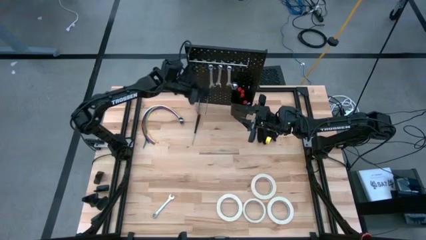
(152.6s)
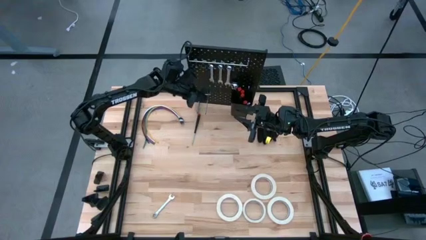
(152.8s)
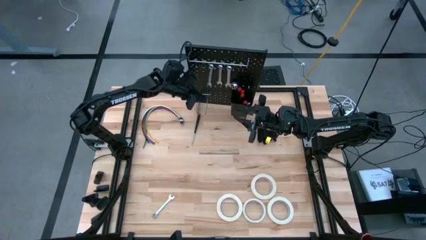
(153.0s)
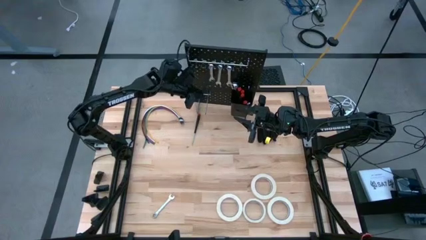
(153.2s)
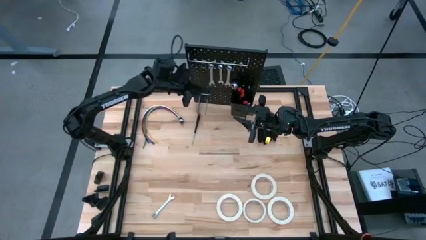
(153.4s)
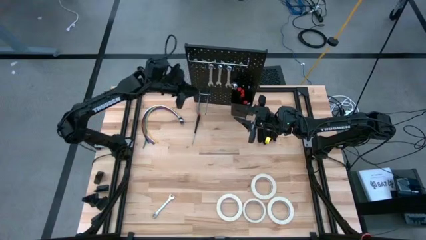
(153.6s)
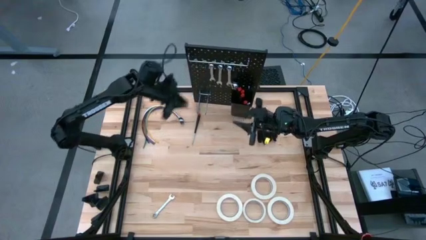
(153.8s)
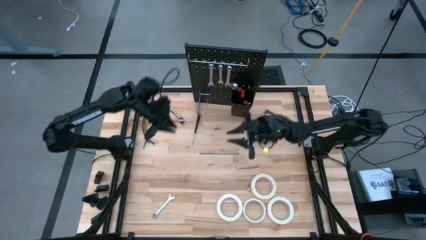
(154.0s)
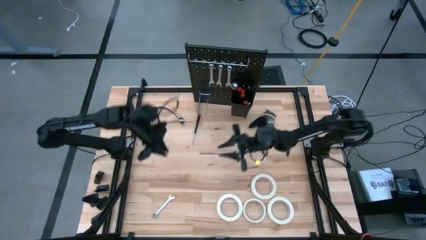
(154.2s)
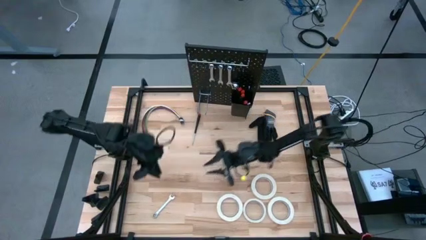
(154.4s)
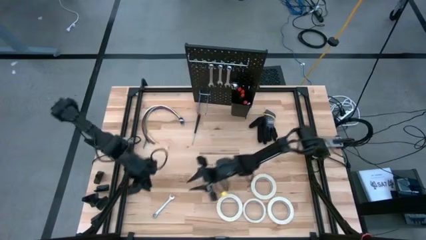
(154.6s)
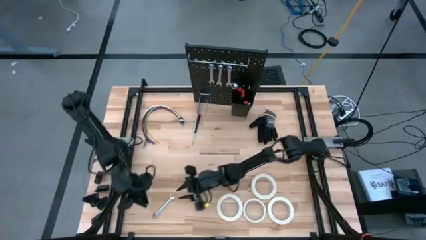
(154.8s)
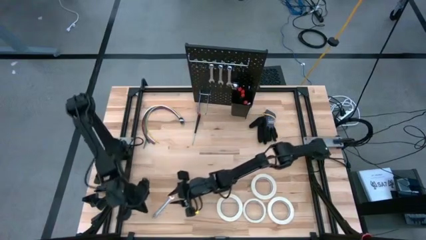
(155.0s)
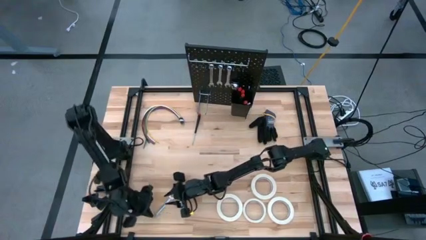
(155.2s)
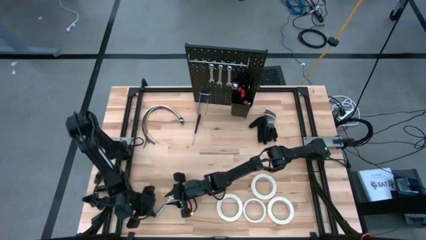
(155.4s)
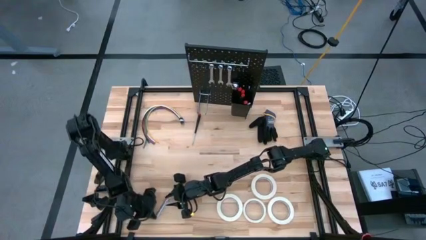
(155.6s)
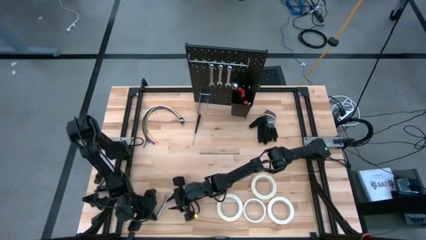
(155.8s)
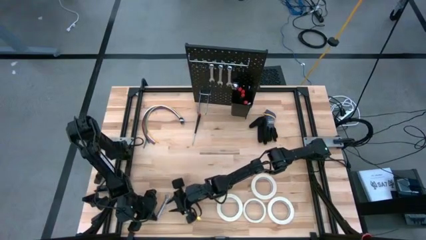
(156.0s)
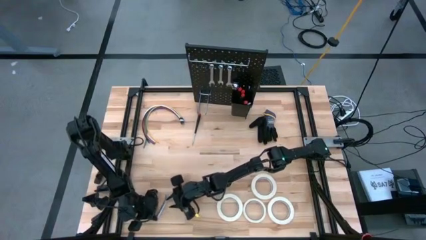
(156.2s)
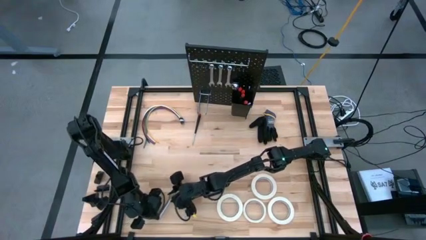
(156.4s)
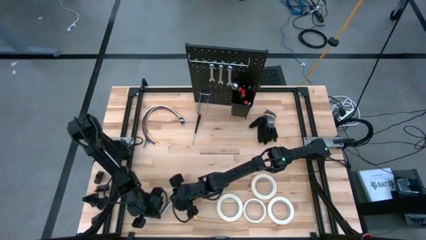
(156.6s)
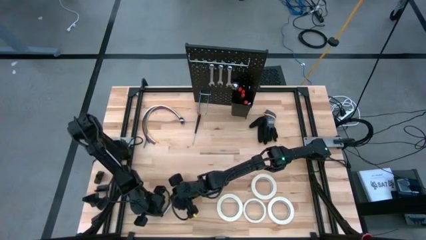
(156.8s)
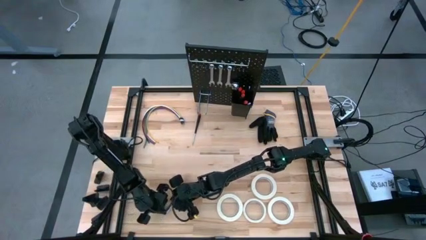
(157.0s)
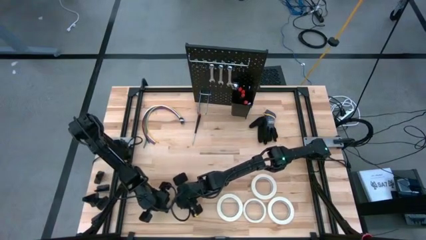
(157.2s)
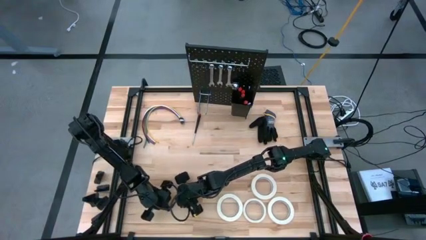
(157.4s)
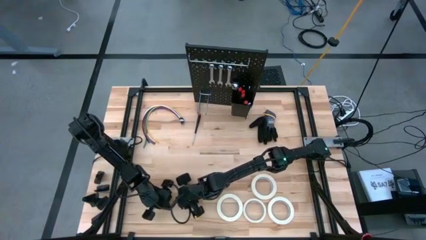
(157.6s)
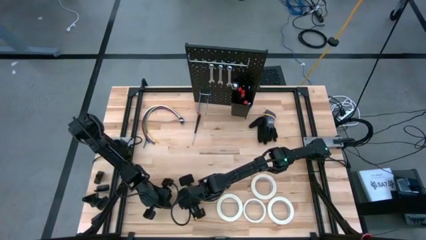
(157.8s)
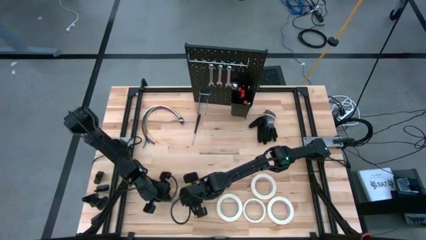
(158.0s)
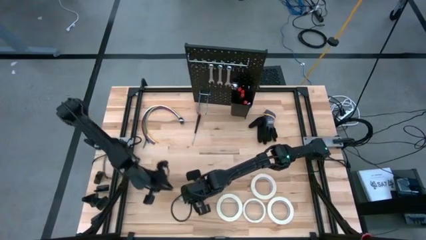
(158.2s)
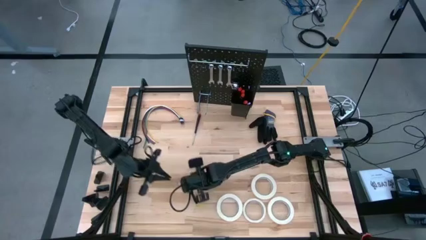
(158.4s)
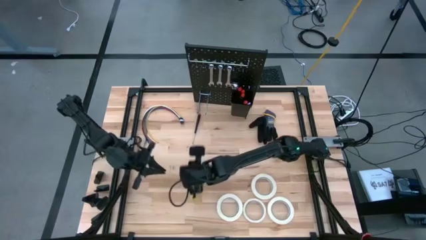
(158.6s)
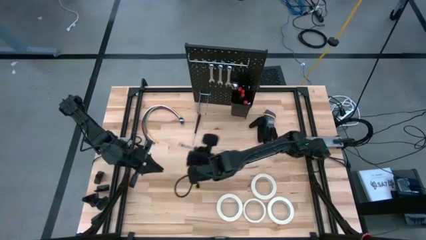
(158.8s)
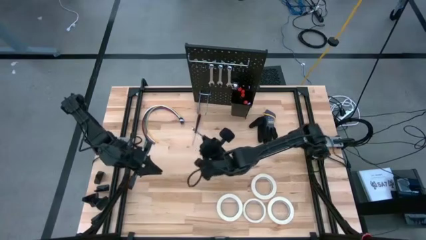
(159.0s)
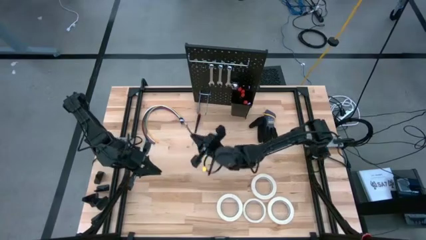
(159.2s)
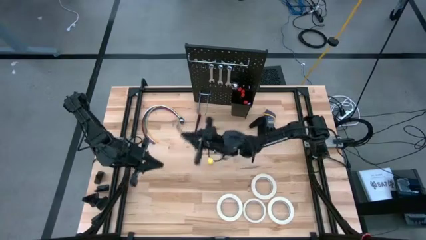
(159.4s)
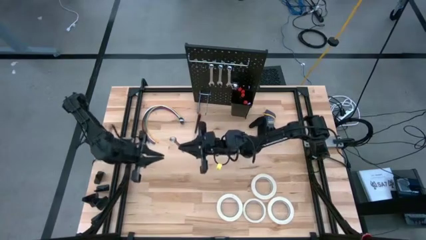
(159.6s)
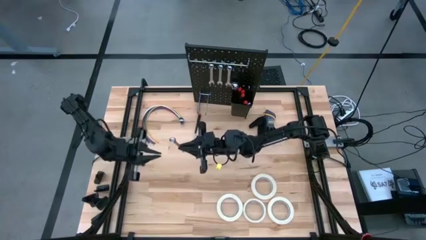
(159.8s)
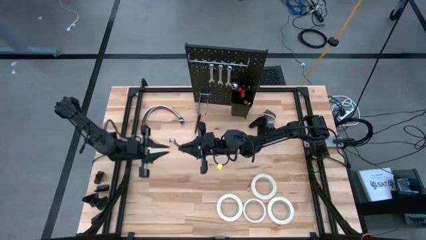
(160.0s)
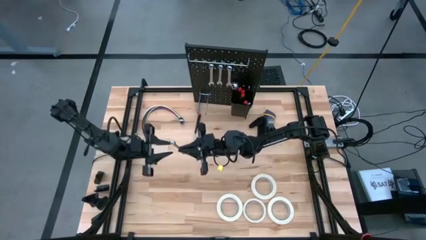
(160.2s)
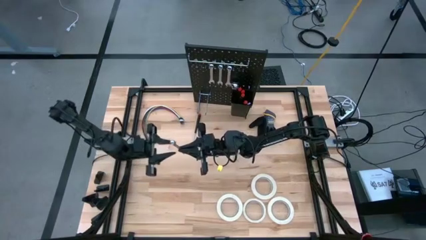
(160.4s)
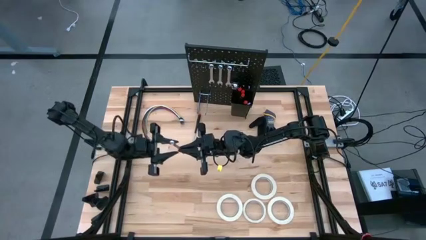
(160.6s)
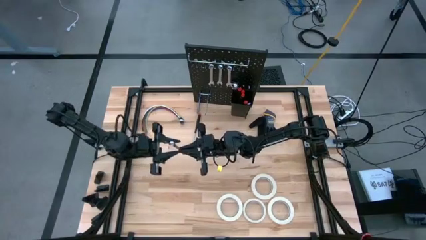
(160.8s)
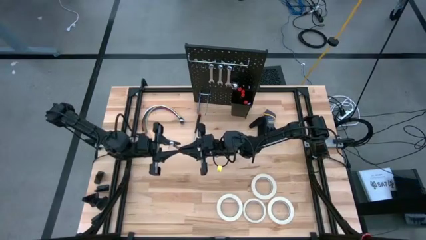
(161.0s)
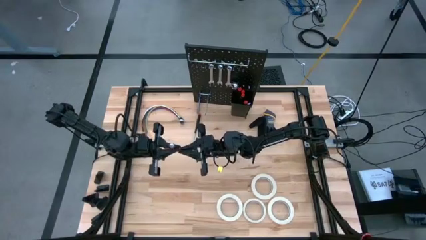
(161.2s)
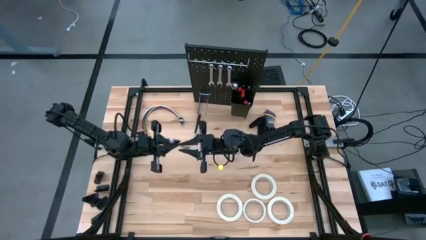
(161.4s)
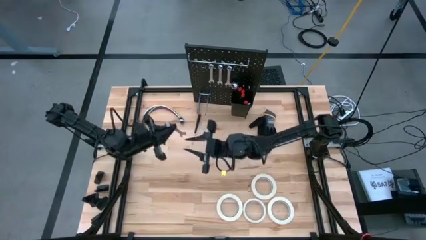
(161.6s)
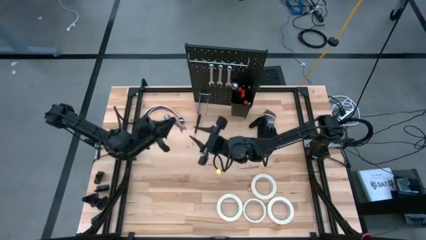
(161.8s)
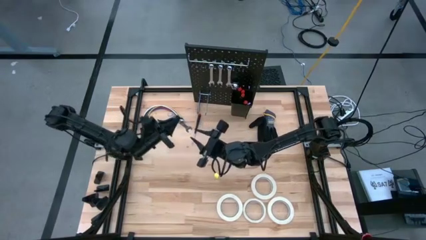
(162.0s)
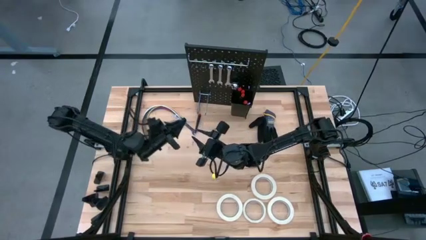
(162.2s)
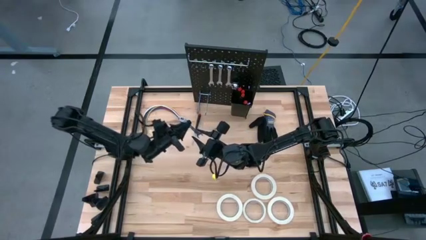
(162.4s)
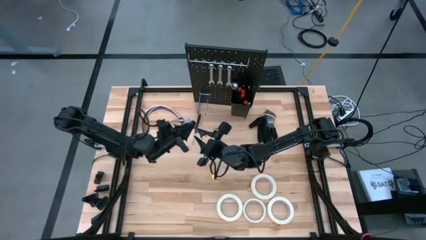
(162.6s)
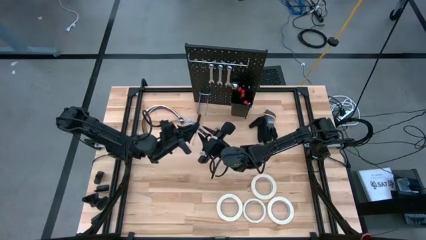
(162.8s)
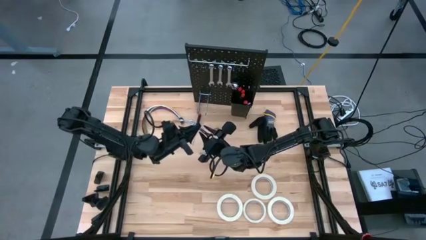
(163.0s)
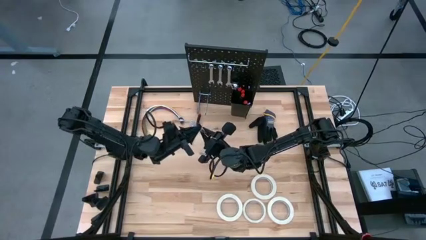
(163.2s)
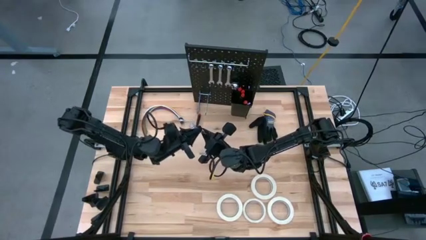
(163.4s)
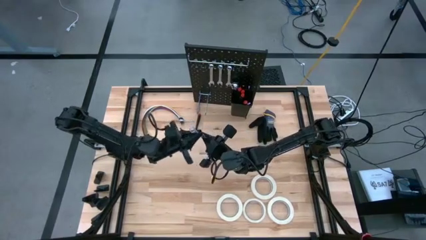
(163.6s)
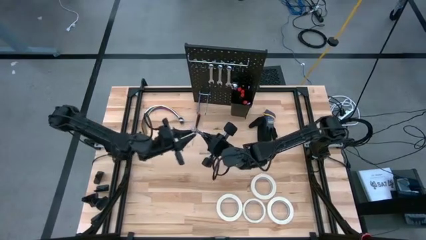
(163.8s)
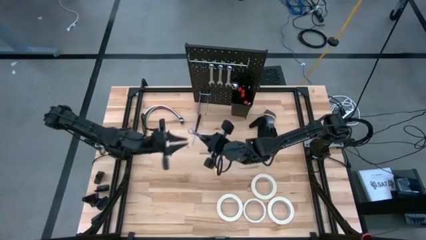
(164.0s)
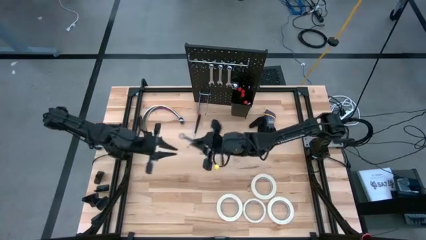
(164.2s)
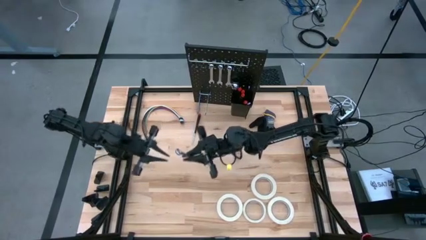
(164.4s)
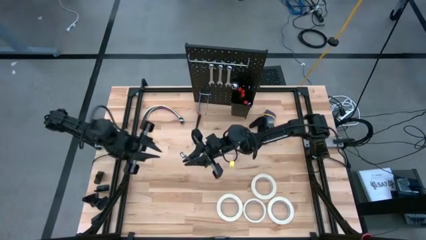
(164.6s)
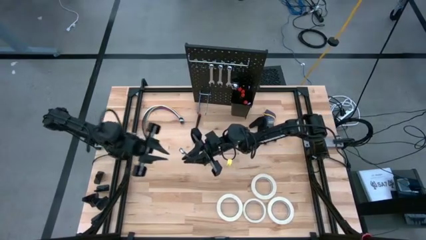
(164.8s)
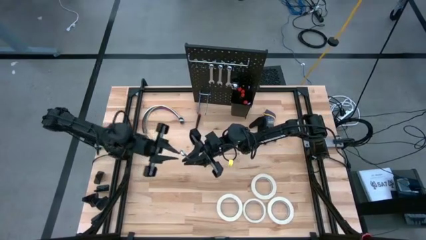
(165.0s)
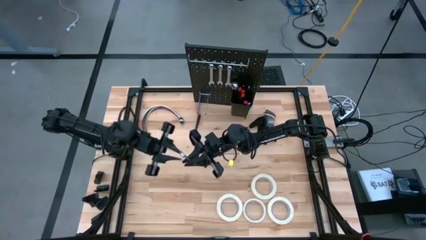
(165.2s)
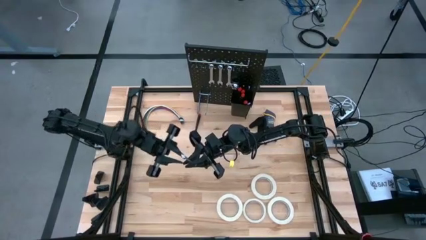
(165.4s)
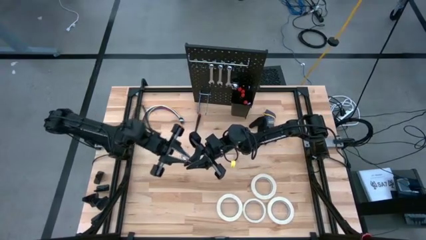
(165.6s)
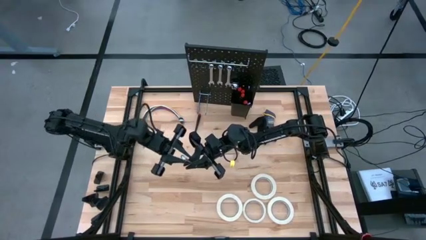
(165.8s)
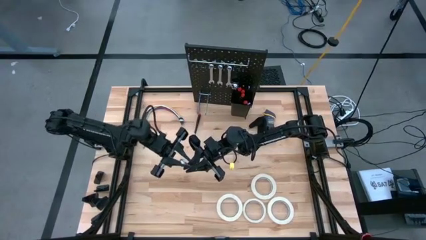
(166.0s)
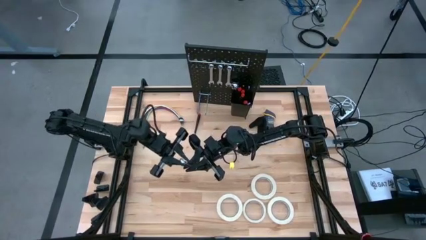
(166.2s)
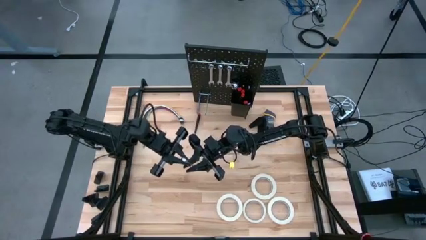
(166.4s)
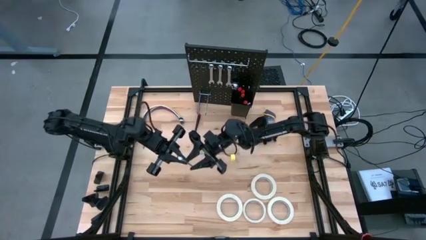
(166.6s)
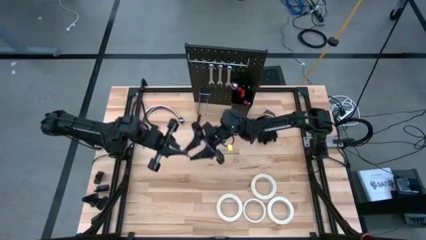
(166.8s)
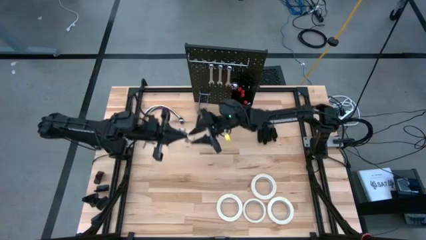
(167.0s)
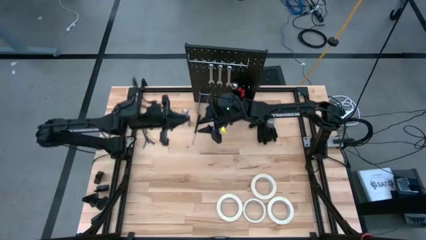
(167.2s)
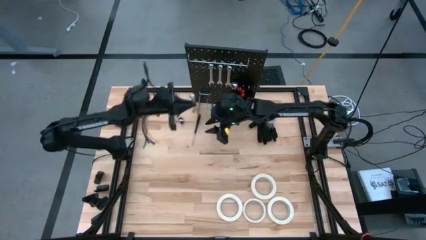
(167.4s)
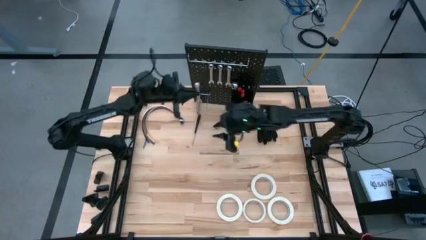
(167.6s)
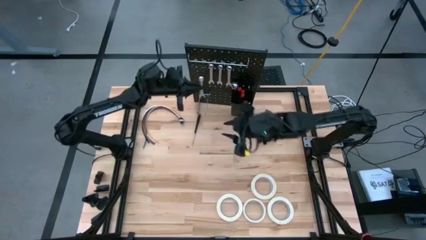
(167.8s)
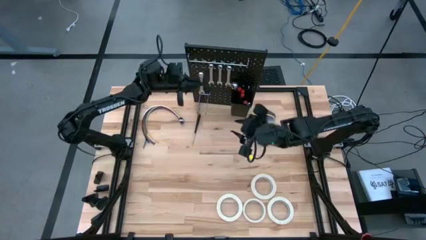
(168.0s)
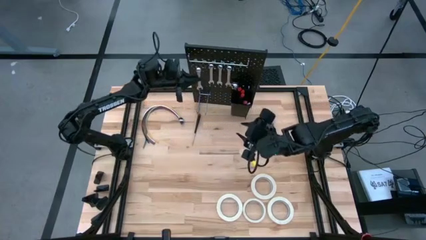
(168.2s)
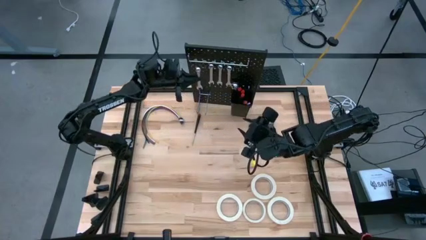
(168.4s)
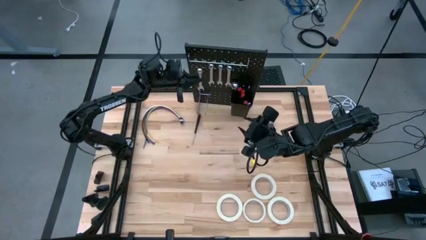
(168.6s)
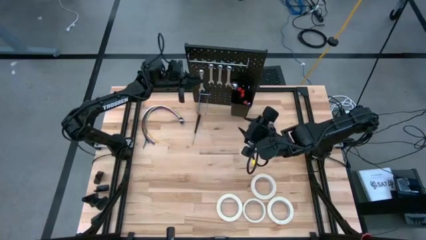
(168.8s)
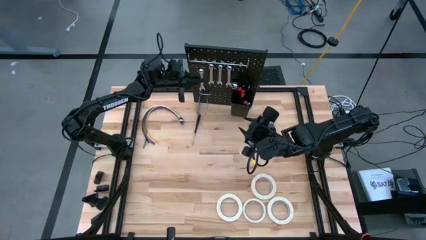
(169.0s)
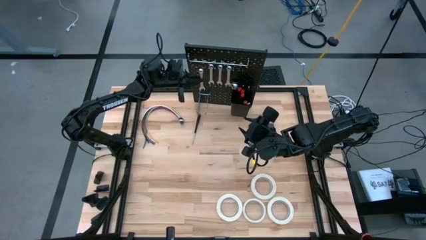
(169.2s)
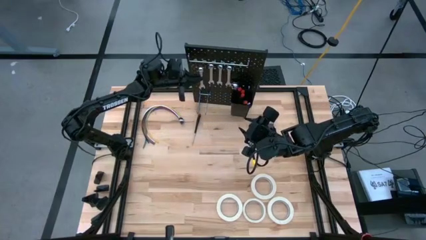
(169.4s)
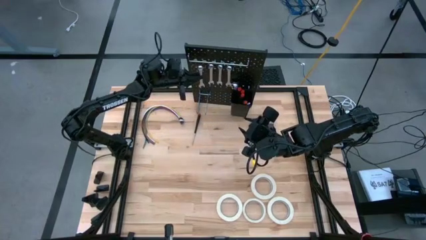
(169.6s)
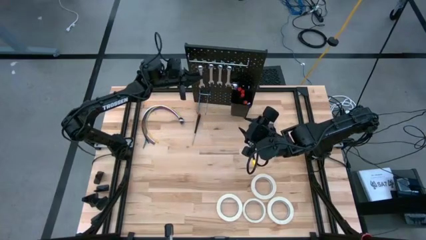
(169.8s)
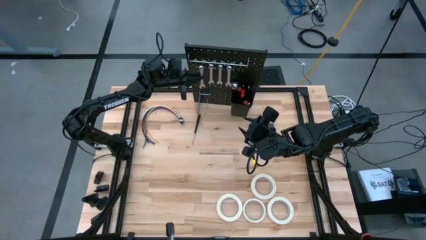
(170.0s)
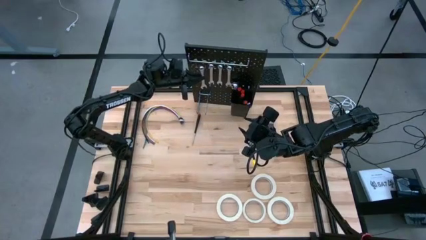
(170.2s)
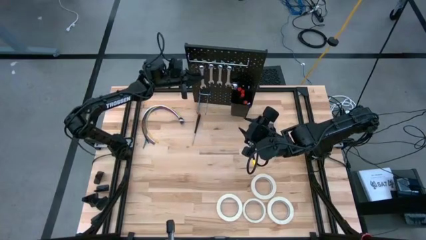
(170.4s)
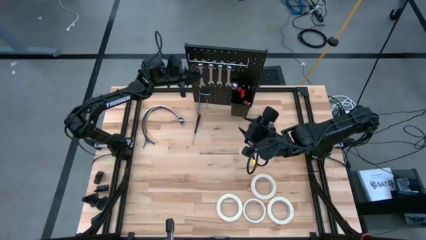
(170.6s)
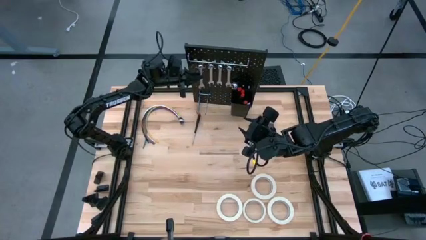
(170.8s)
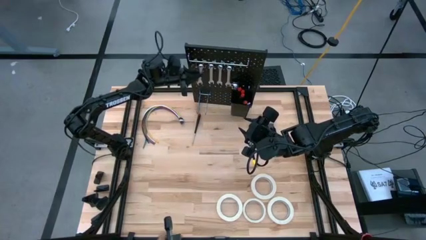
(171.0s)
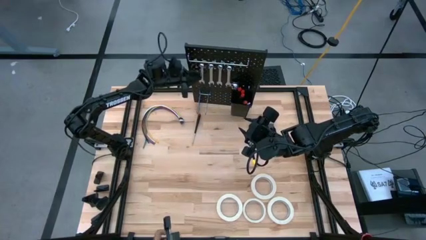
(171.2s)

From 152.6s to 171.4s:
Task: Hang tools onto peg board
Hang the silver wrench on the peg board
